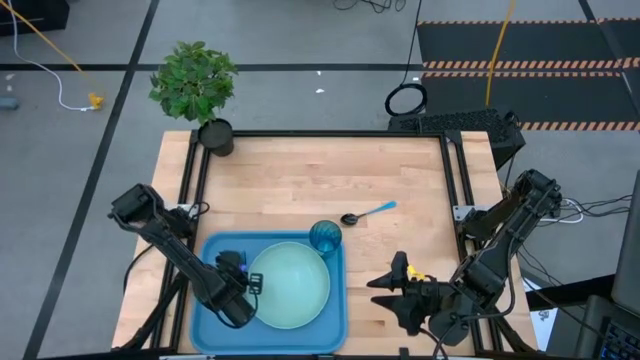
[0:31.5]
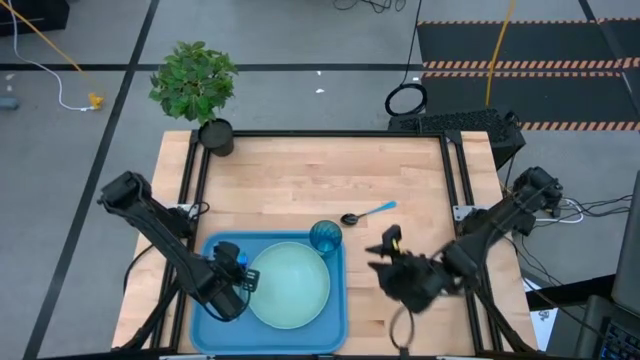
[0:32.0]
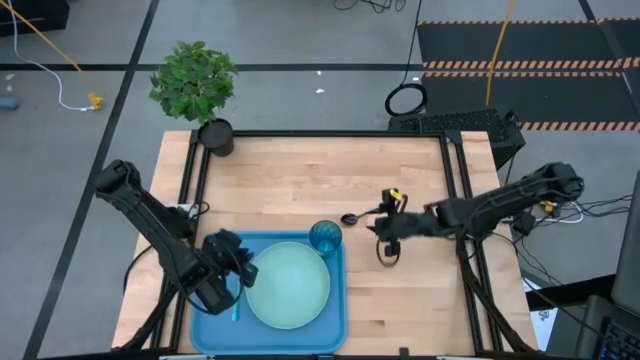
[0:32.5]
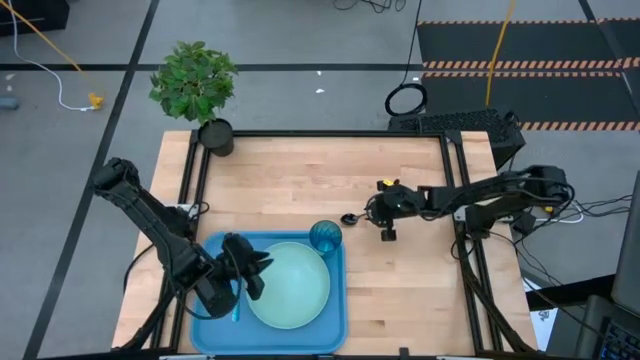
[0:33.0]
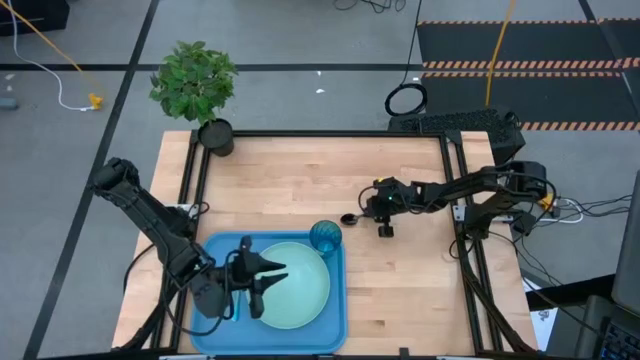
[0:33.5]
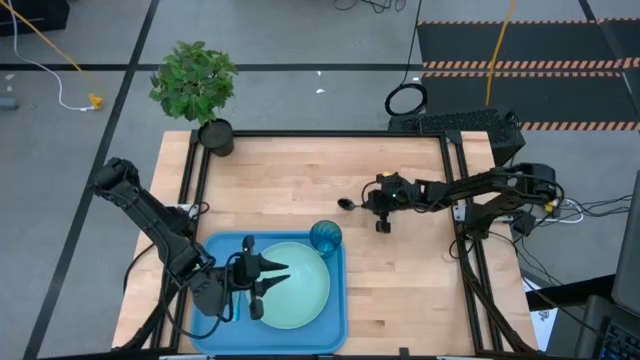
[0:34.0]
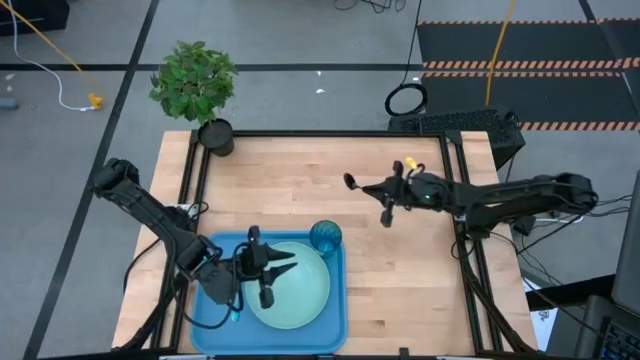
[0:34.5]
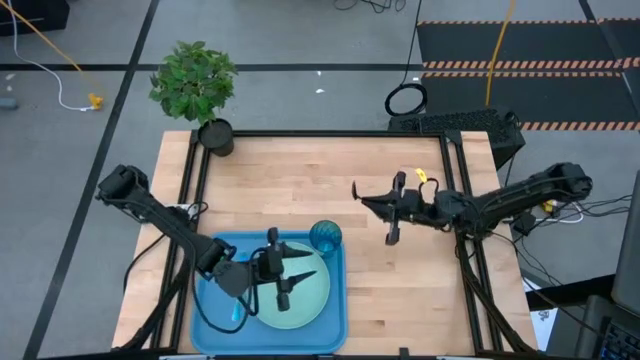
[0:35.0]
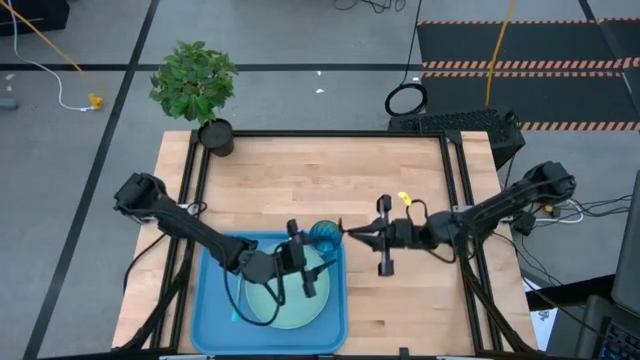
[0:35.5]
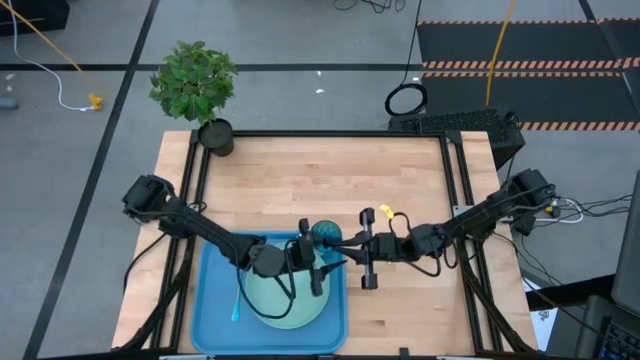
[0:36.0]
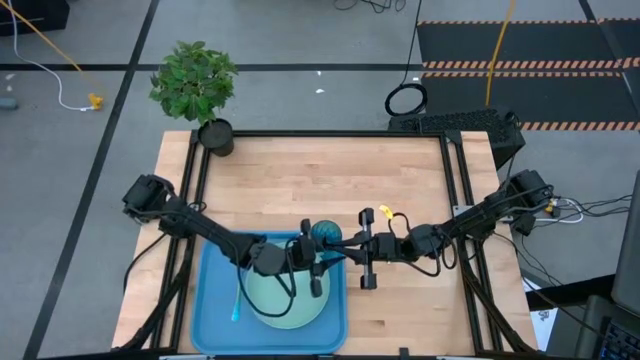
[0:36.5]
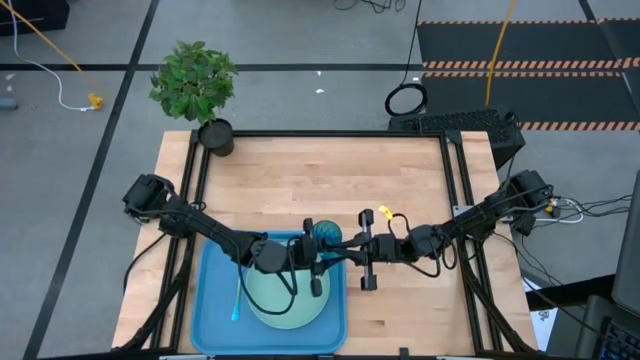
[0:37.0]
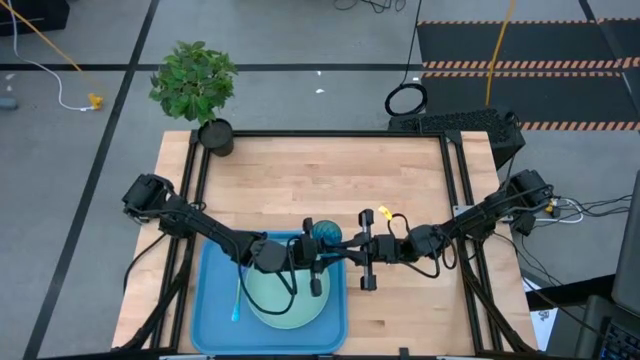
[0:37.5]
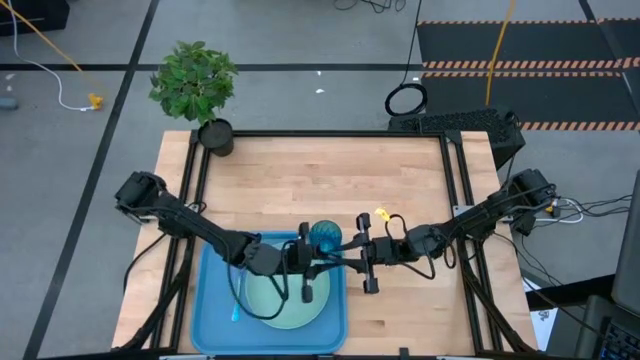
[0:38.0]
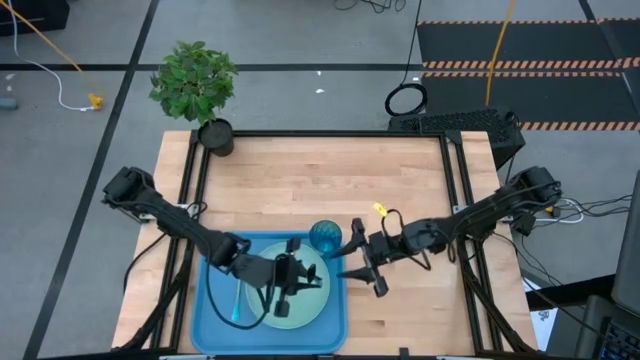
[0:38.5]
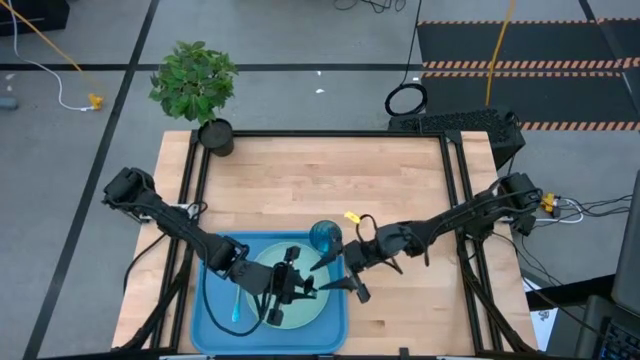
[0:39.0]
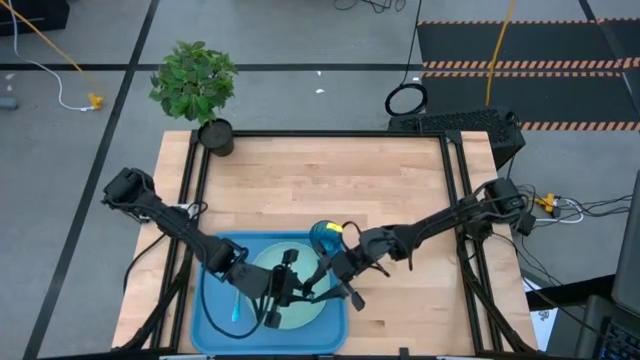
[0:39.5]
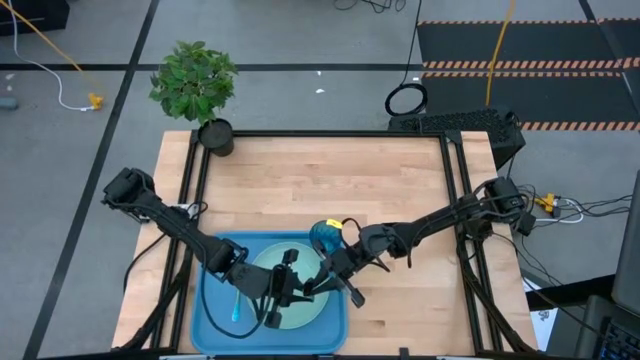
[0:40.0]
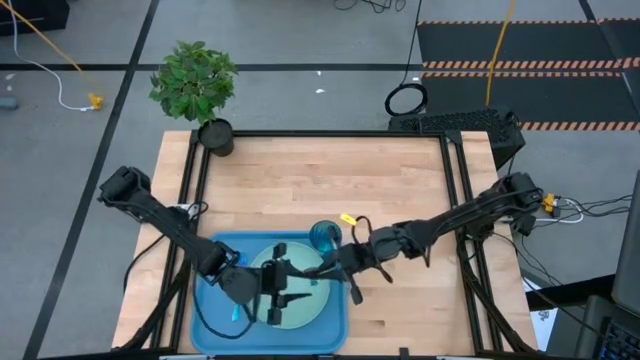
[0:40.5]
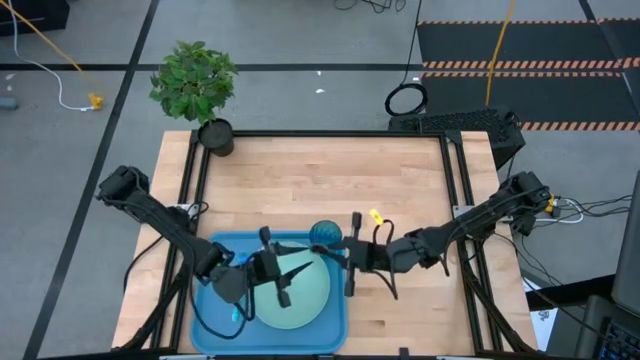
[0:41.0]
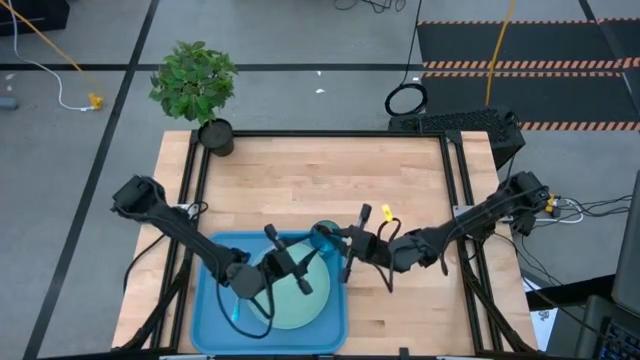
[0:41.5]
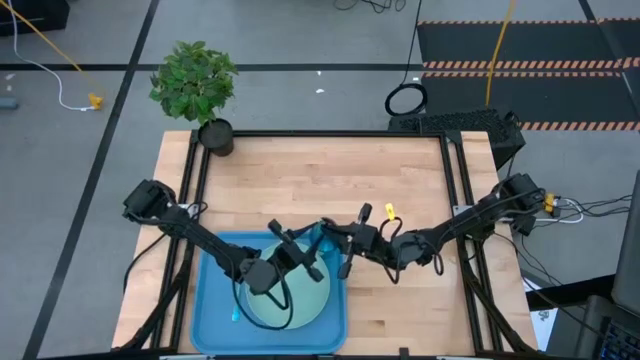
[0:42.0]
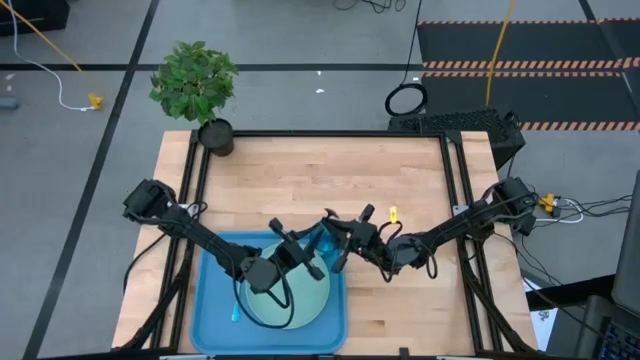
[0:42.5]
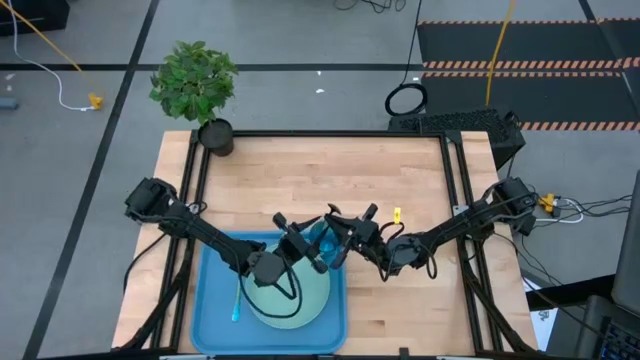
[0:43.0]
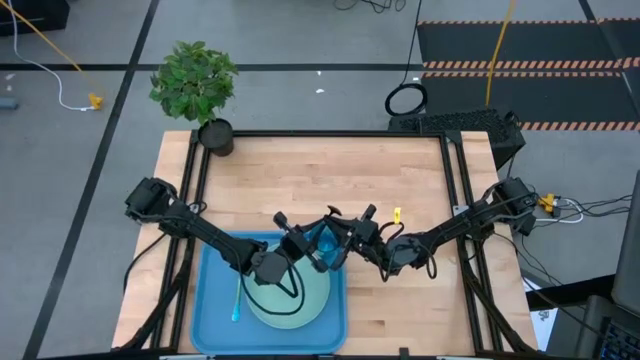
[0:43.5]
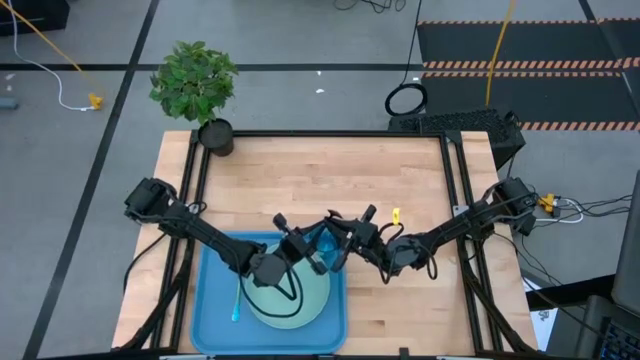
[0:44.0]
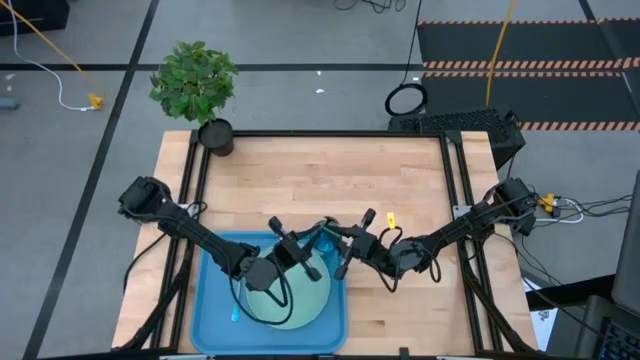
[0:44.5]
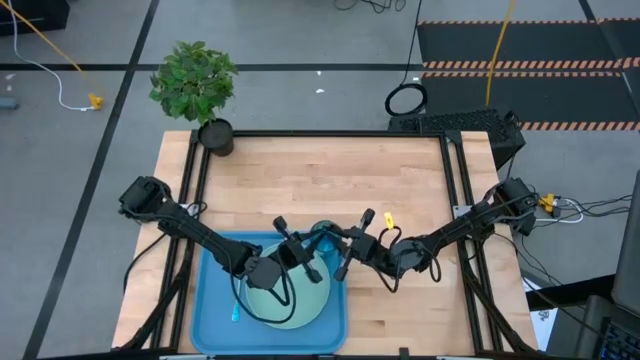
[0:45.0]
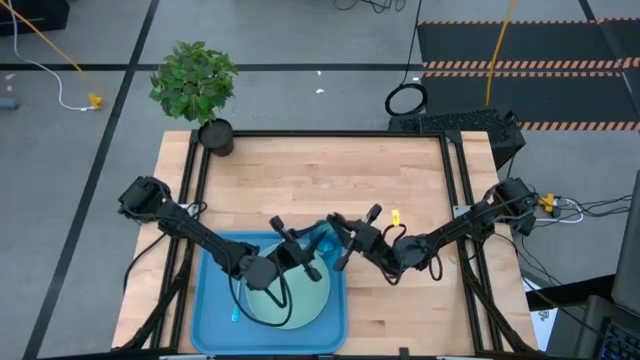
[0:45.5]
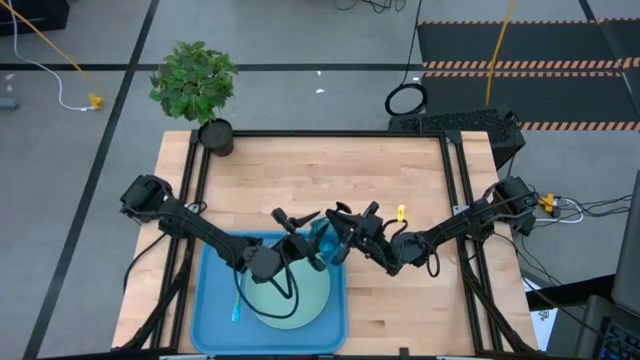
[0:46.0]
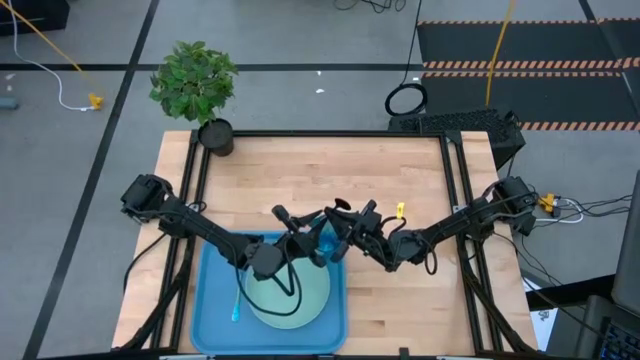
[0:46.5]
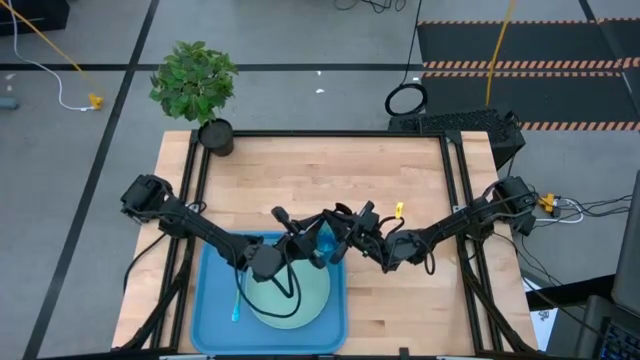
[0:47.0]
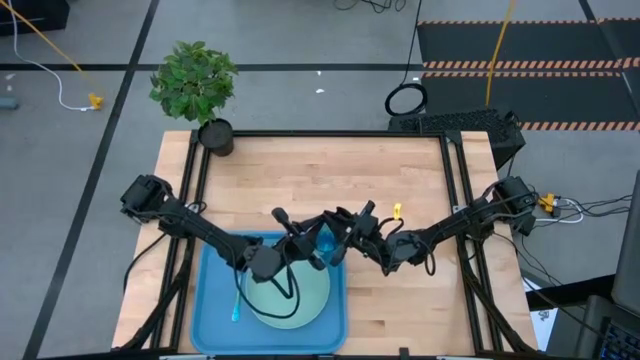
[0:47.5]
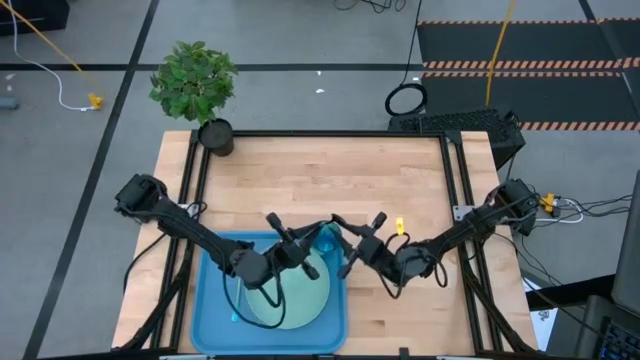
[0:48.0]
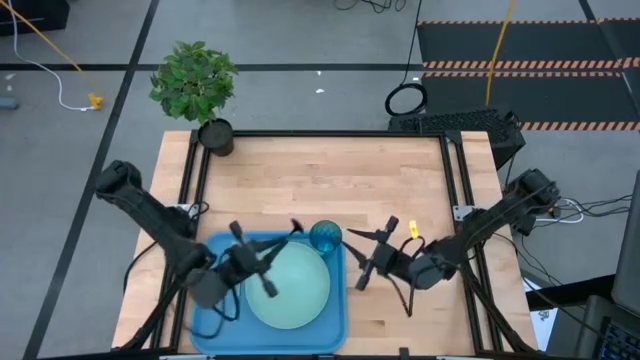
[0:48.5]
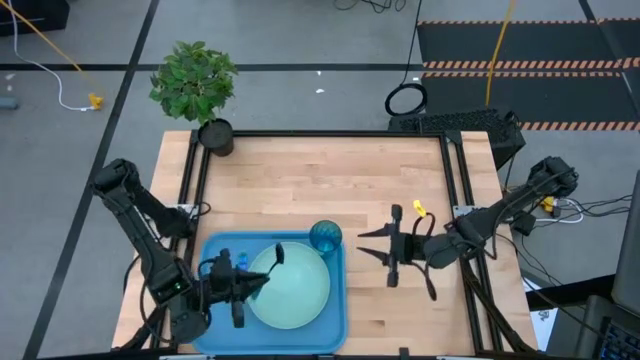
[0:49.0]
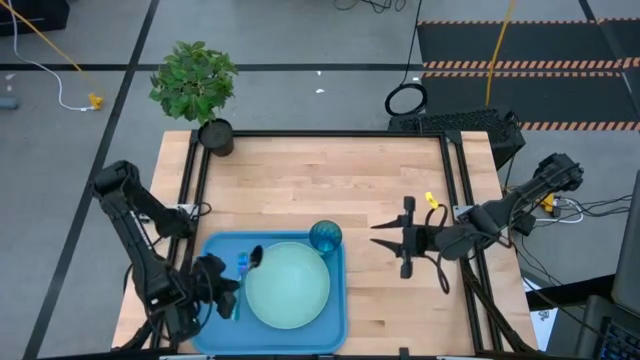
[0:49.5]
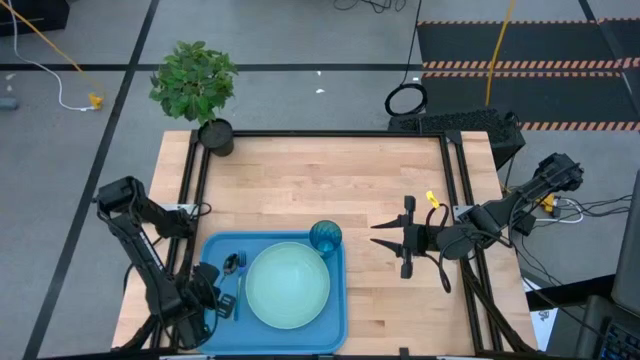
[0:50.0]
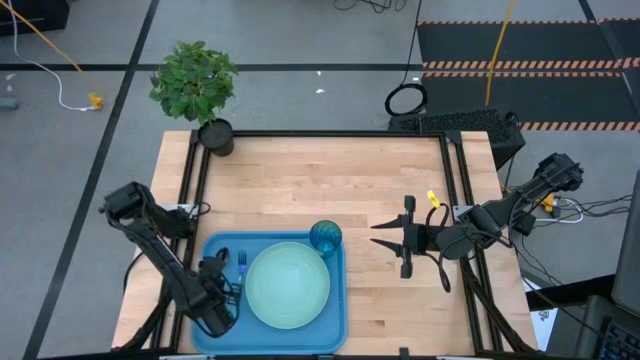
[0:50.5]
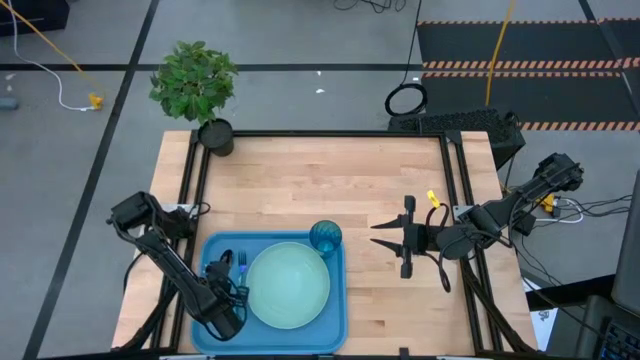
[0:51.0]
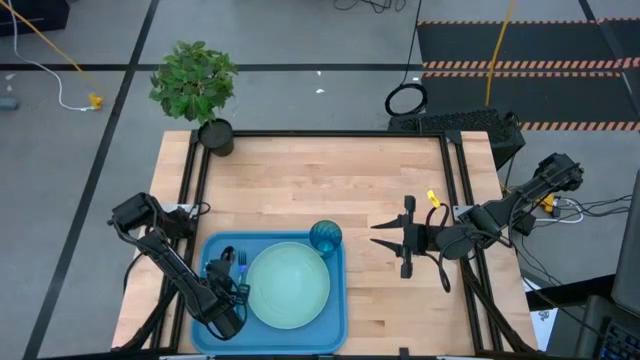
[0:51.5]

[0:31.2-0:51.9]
Task: Pick and place plate/cup/fork/spoon on tray
Put the blue spoon beside the blue fork
